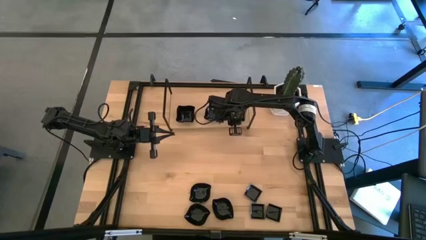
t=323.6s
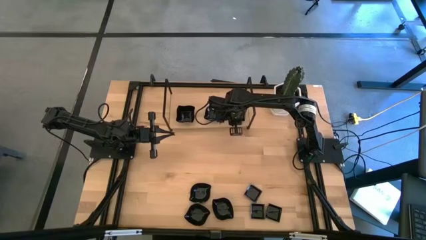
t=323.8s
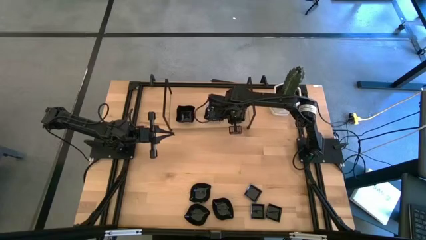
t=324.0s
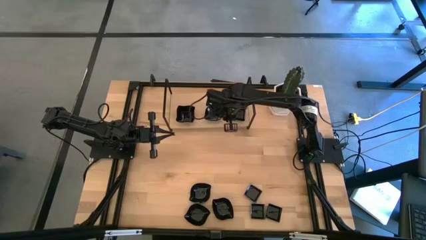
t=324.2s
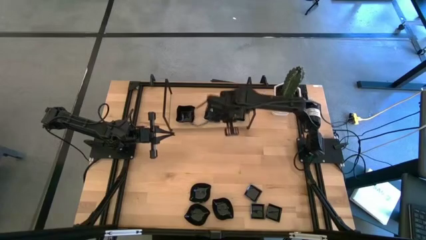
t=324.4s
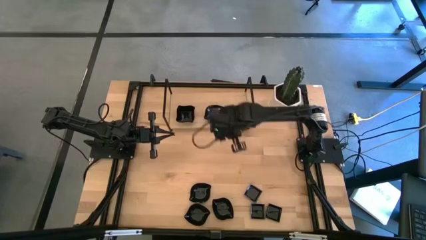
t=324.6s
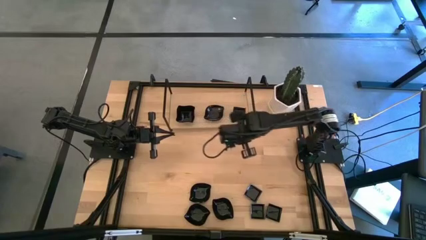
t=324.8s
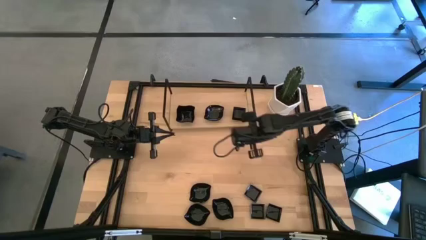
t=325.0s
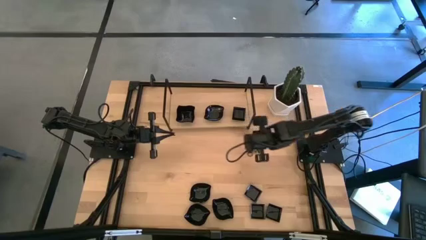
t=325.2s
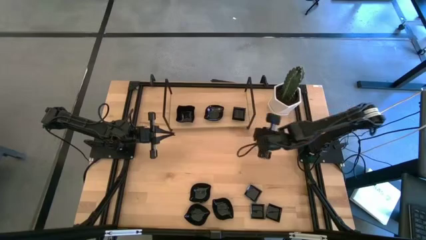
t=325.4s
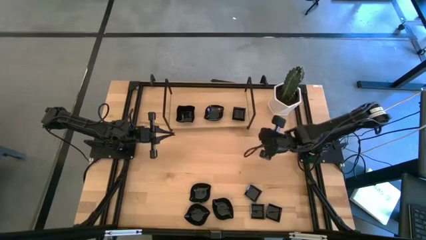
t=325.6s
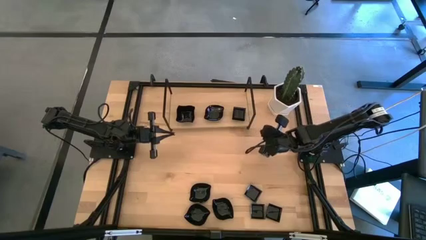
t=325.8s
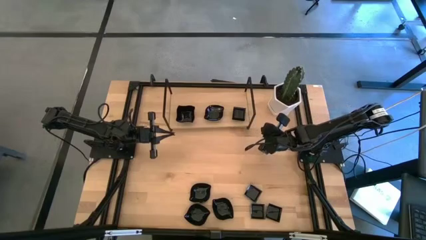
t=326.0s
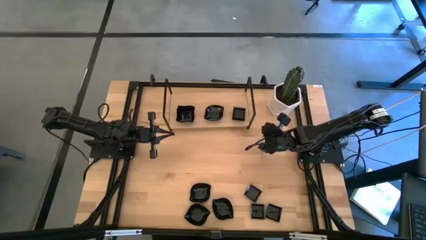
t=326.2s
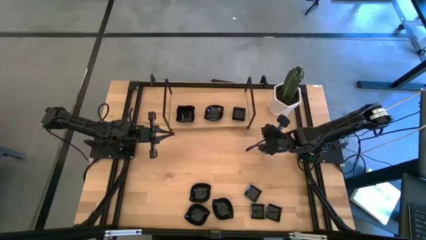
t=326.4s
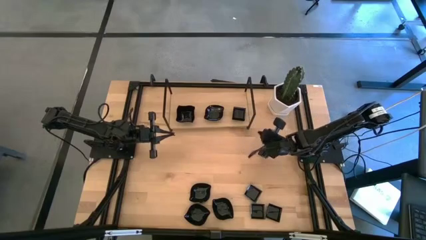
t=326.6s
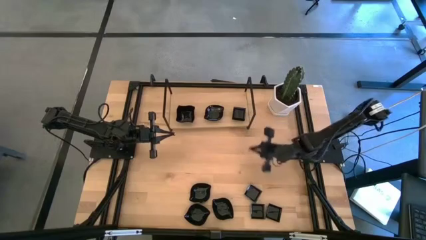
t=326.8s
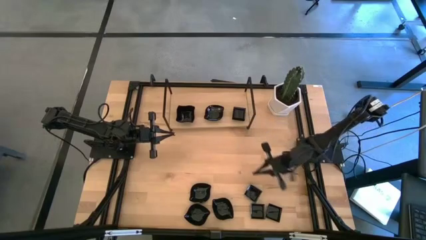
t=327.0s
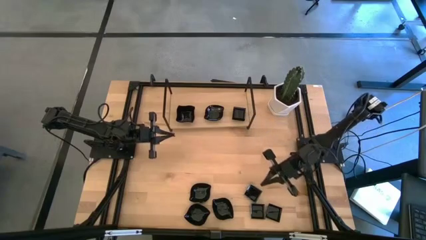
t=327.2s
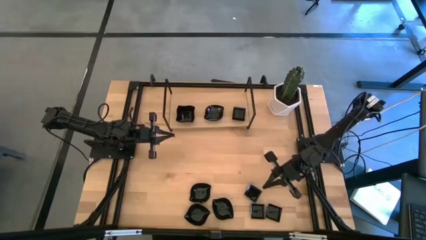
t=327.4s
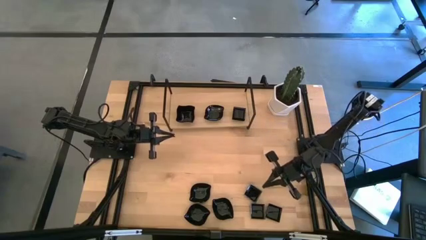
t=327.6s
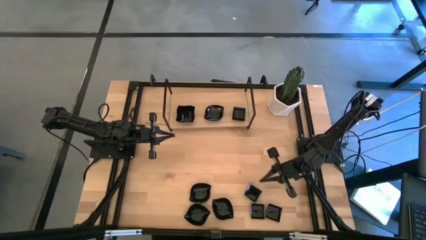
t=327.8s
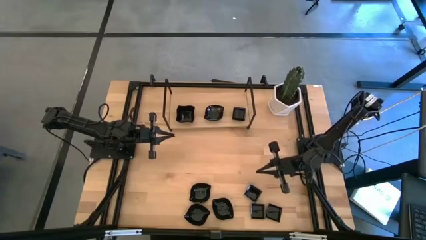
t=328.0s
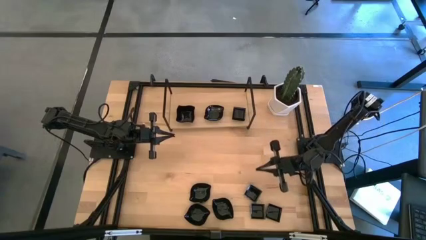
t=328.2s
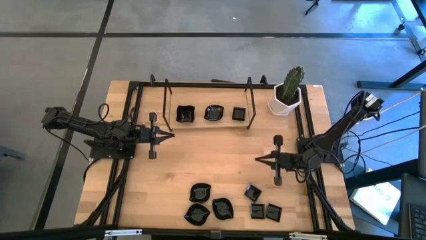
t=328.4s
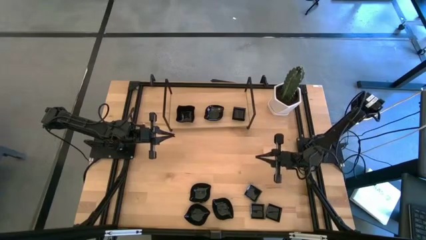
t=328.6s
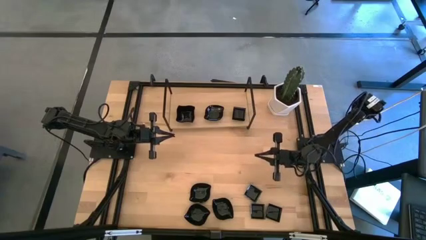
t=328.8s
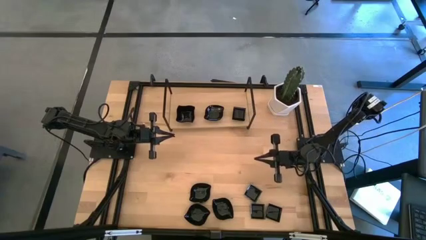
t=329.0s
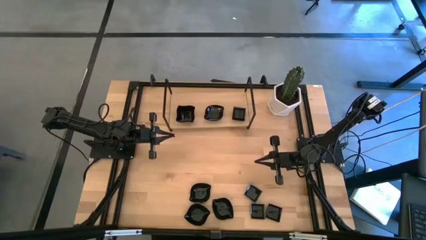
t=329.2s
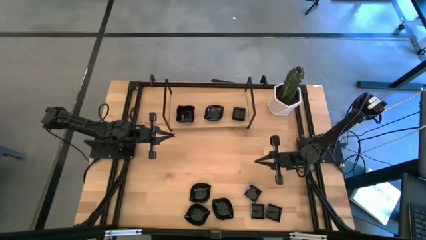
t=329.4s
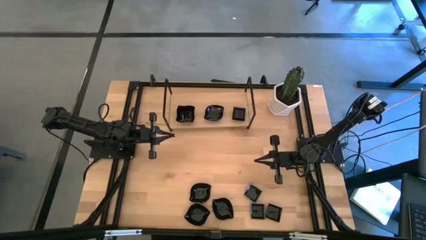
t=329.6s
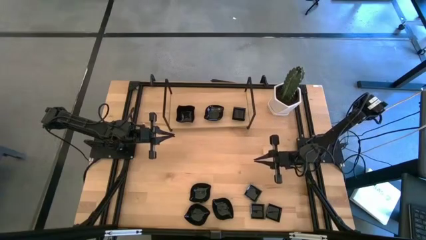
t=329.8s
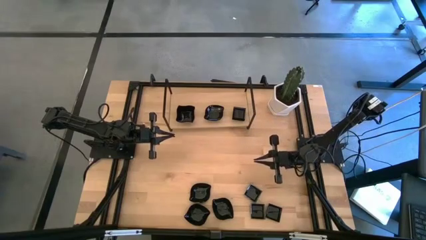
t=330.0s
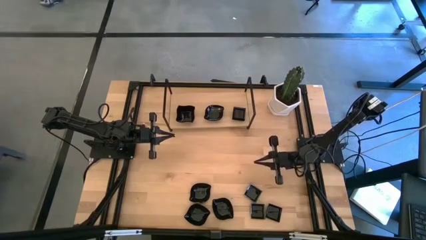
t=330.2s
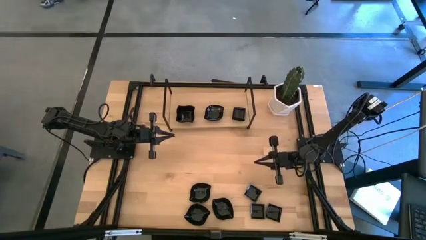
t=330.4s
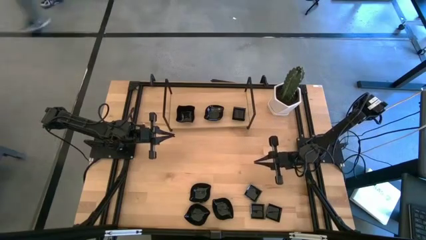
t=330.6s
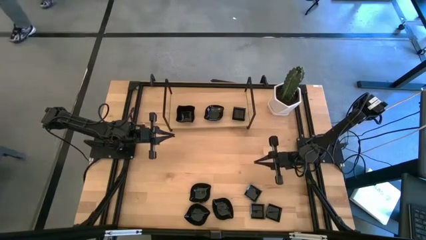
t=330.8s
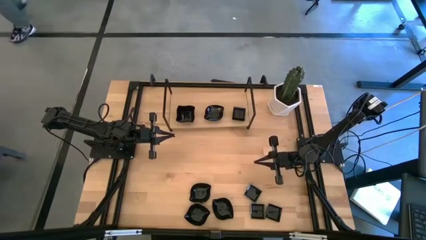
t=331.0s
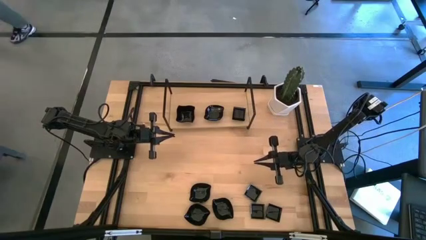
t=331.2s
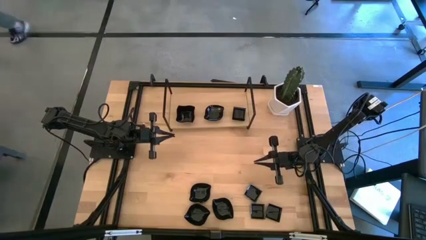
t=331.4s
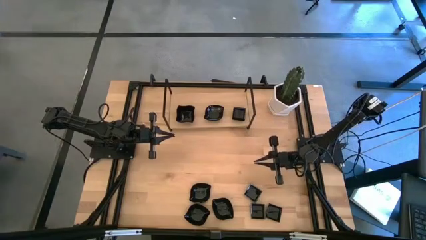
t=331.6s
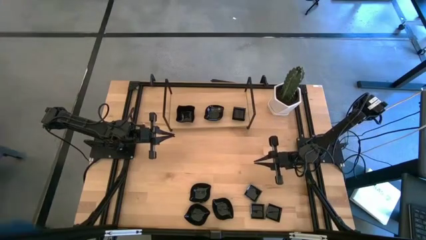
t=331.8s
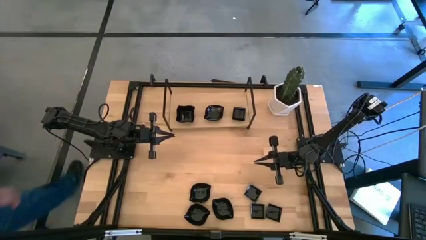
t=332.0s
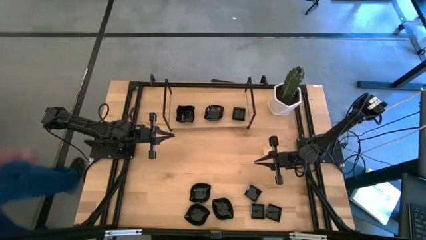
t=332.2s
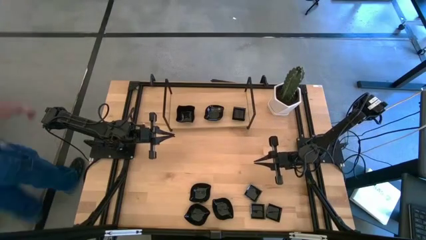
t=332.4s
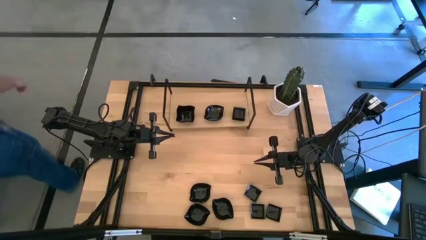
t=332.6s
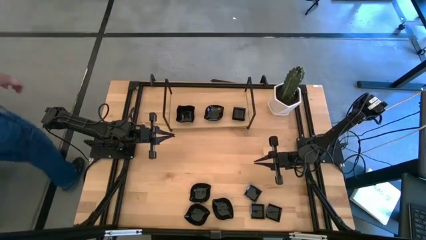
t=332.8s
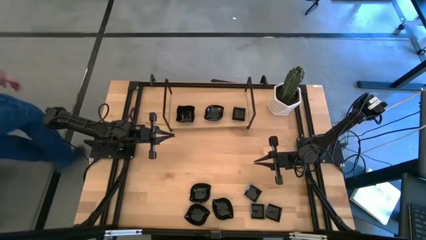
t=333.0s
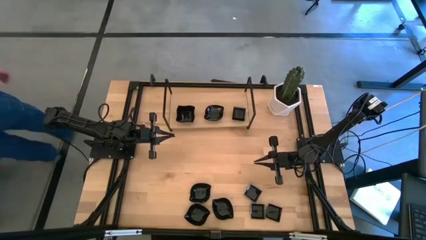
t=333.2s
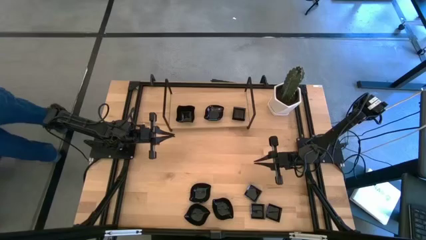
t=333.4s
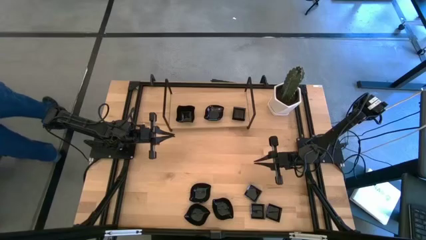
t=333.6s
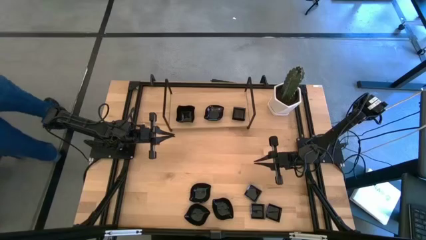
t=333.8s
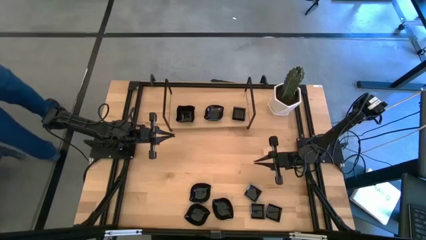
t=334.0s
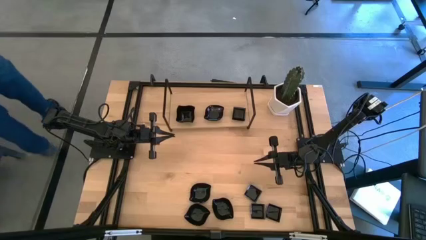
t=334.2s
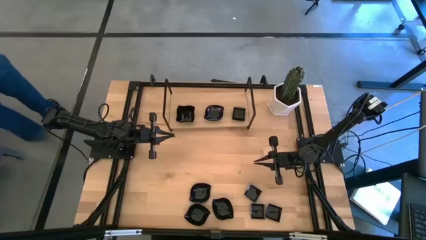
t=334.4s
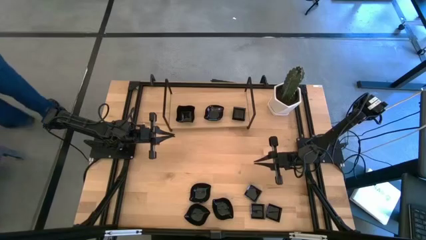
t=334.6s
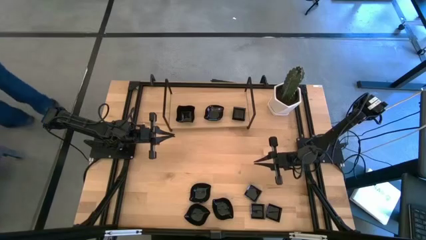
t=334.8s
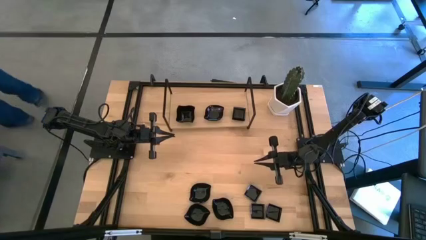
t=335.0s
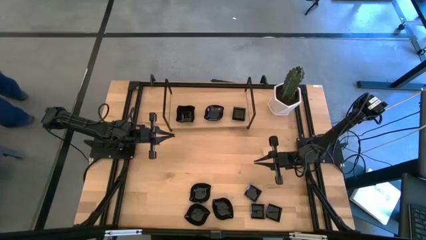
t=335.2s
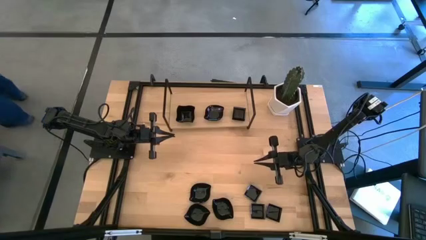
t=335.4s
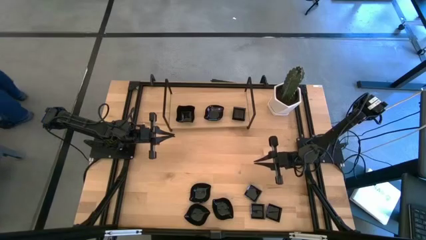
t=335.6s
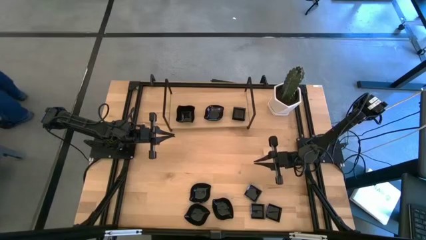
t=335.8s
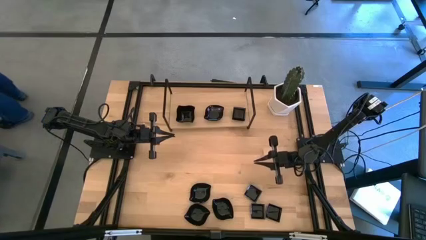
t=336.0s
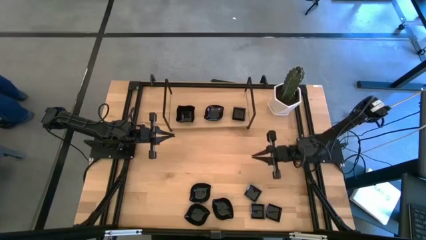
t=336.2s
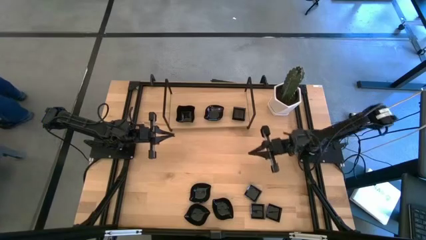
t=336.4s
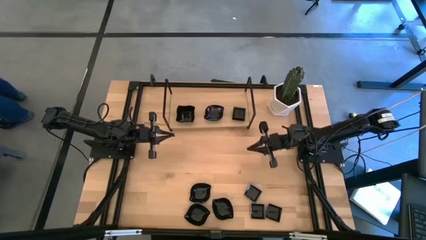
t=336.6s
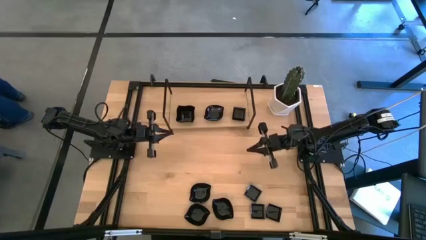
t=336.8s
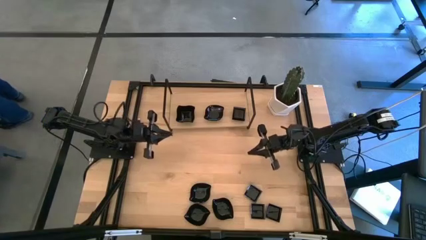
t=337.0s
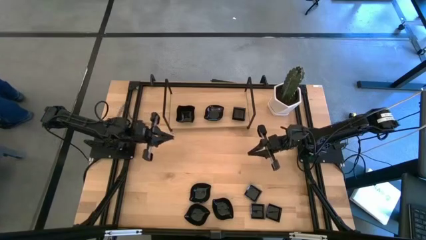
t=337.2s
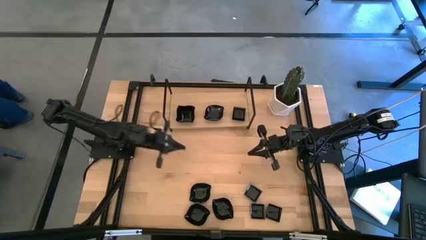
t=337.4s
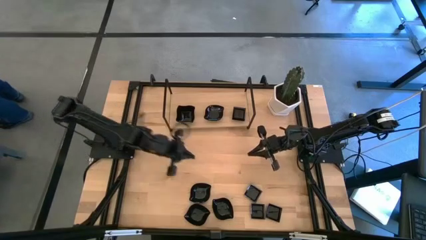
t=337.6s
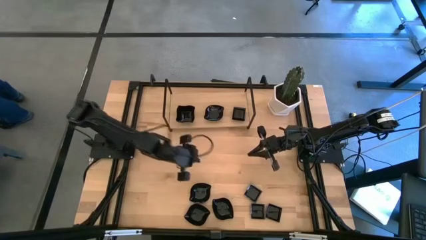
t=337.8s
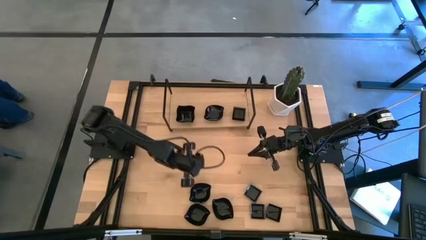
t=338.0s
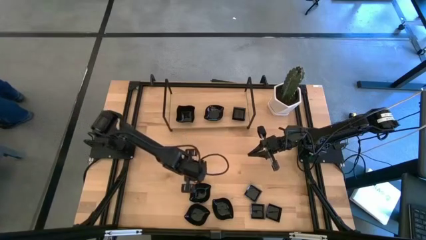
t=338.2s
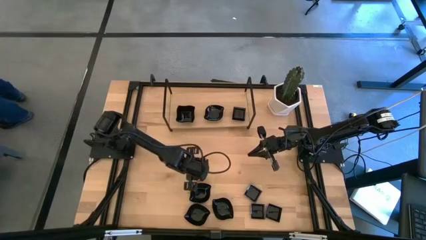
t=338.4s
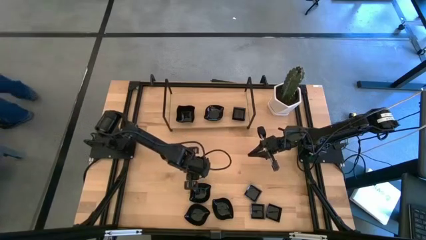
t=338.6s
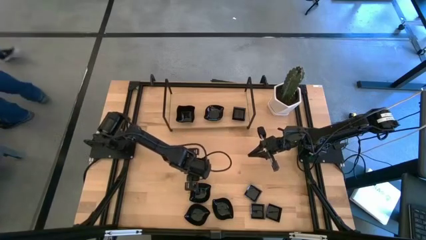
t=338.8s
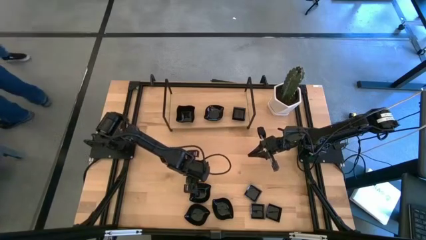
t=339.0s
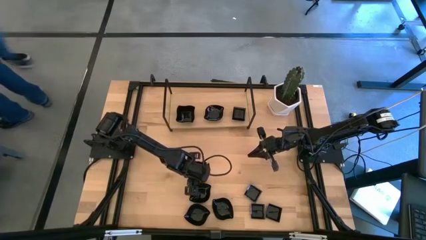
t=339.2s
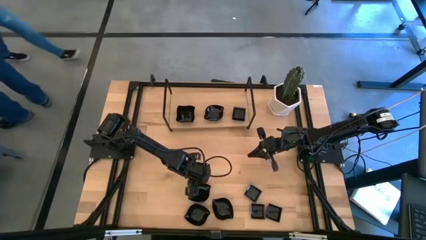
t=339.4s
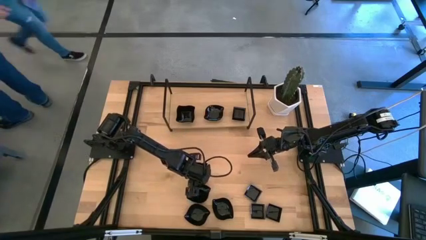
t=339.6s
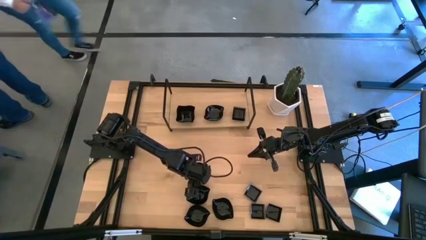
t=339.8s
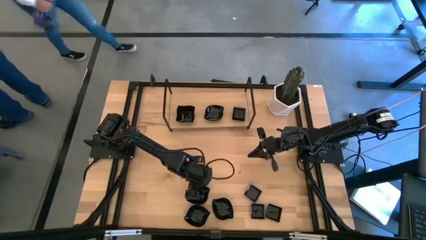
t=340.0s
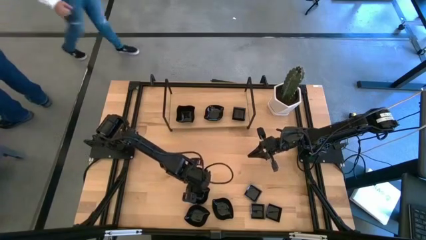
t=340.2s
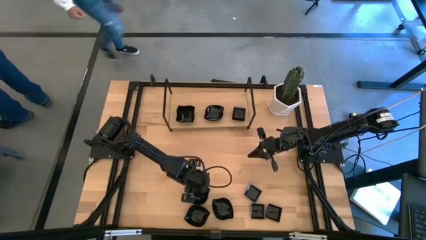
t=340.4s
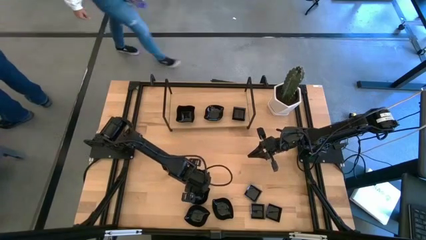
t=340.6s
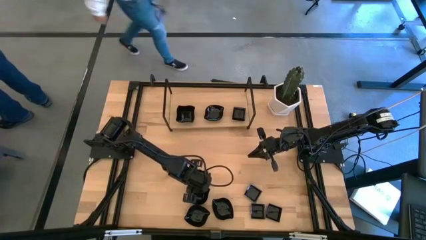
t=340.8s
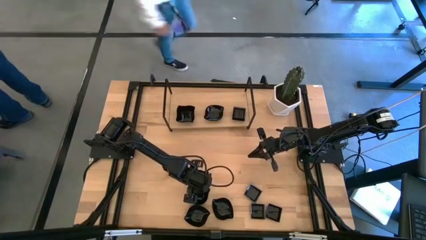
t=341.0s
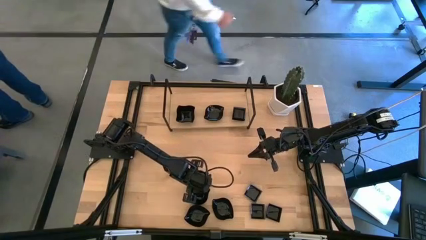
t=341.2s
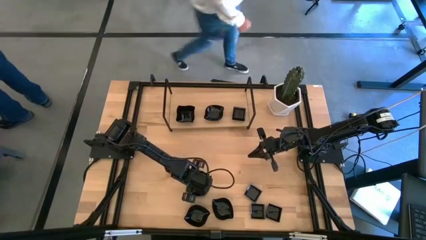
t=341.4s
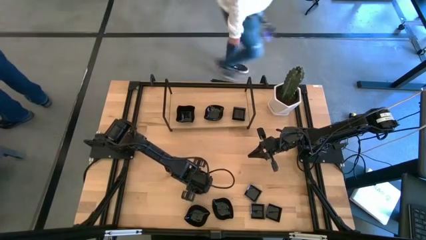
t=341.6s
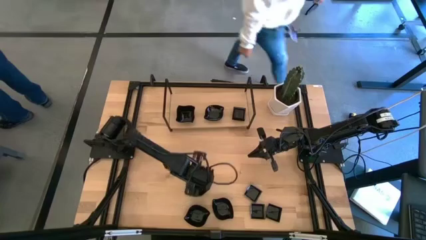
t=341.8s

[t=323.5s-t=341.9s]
Task: Pick & Place Mini shaped plates
Stack the top leaf-shaped plate on the top of the leaf-shaped plate on the shelf
